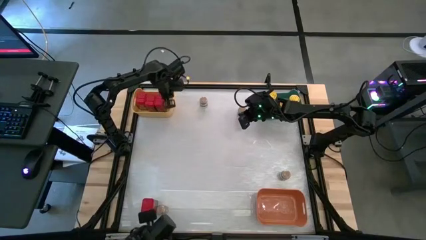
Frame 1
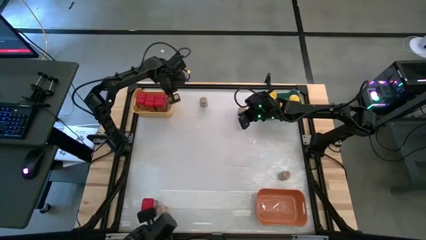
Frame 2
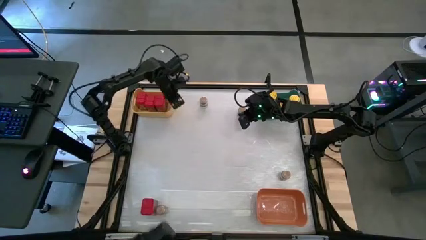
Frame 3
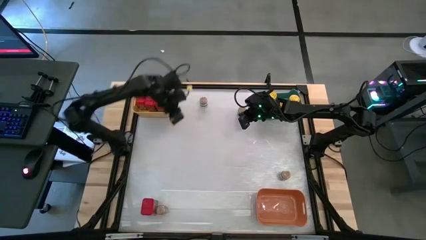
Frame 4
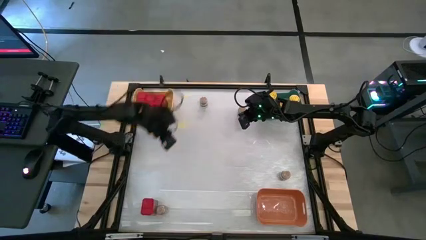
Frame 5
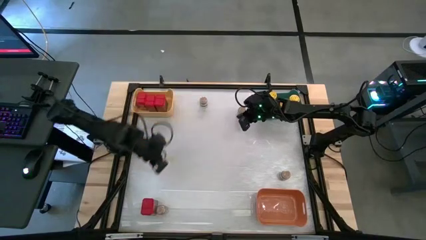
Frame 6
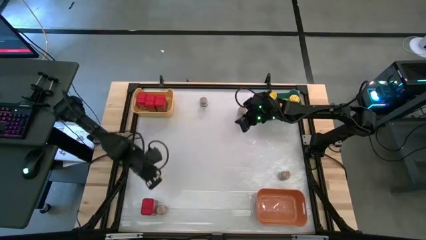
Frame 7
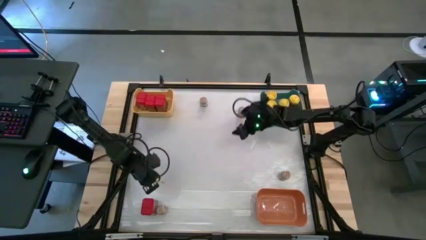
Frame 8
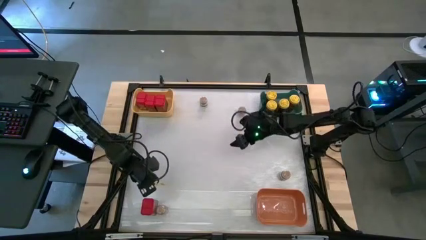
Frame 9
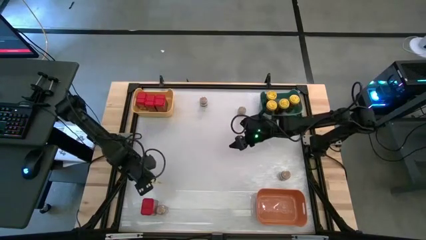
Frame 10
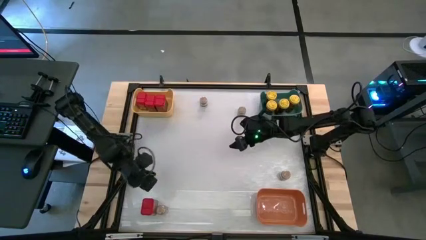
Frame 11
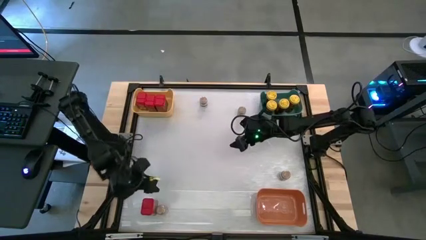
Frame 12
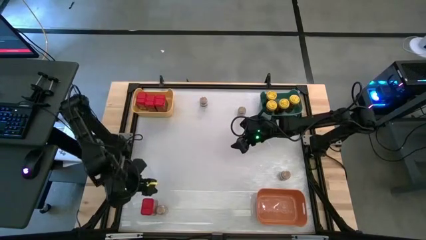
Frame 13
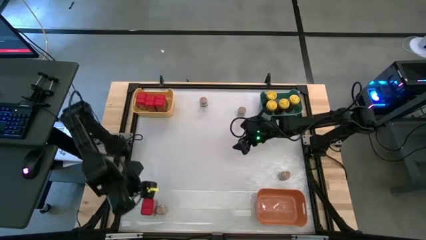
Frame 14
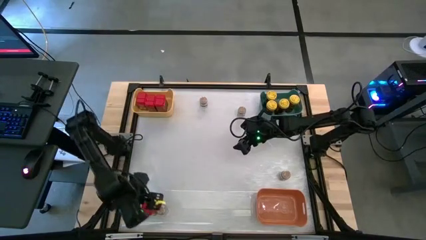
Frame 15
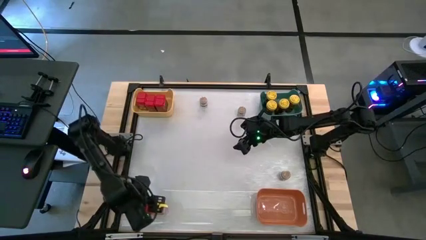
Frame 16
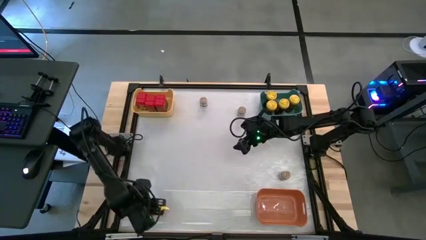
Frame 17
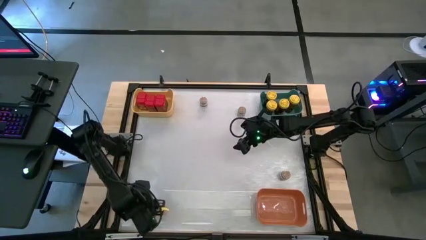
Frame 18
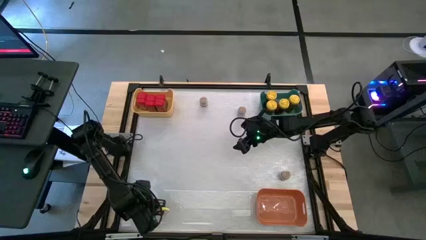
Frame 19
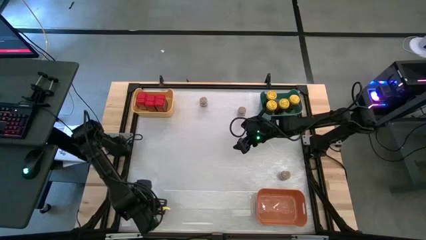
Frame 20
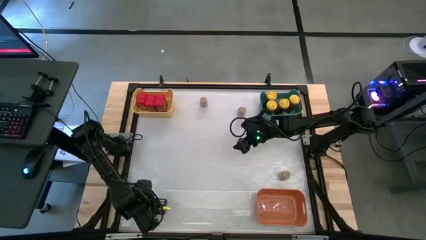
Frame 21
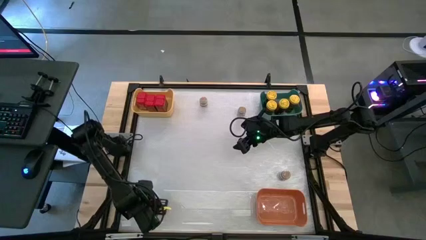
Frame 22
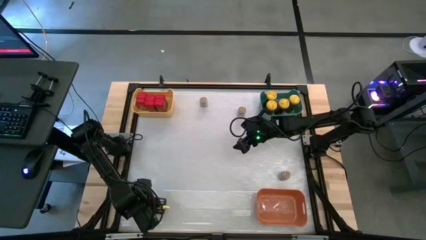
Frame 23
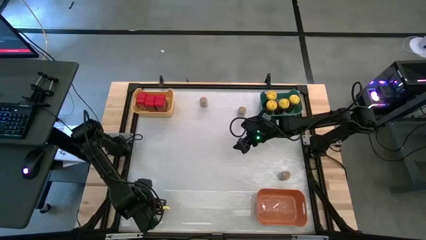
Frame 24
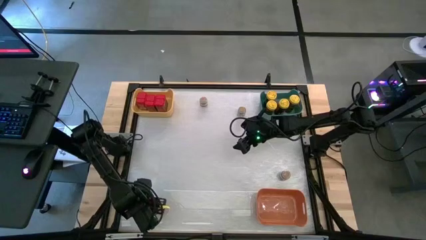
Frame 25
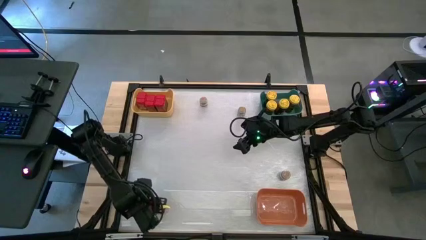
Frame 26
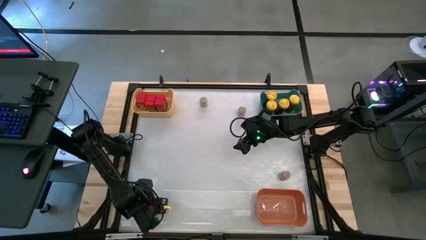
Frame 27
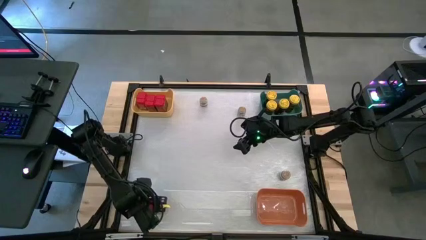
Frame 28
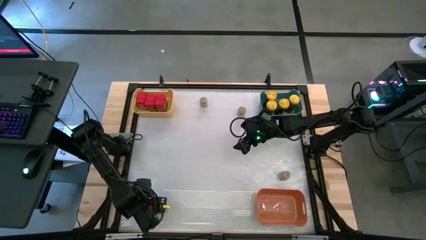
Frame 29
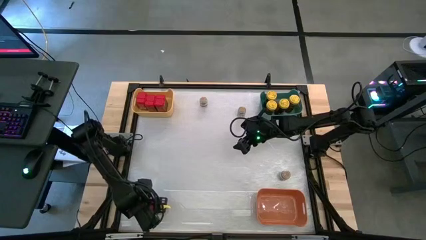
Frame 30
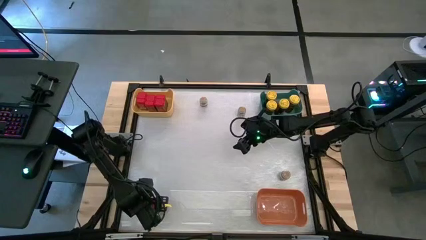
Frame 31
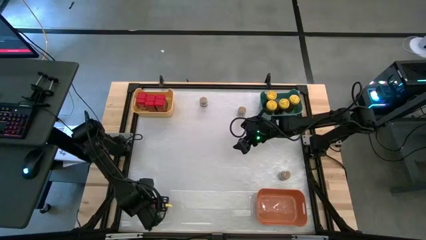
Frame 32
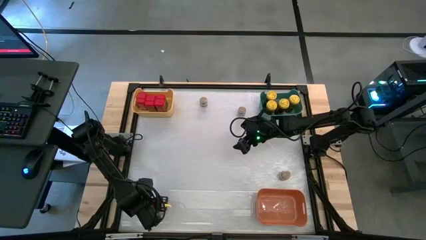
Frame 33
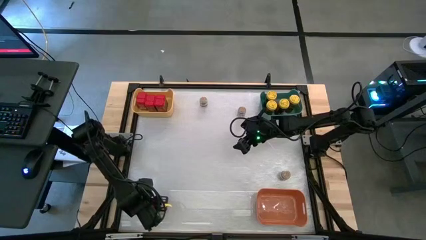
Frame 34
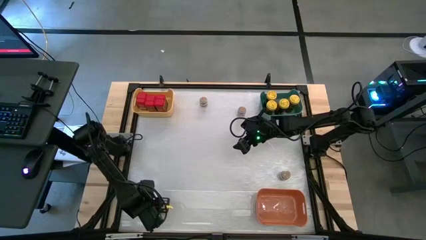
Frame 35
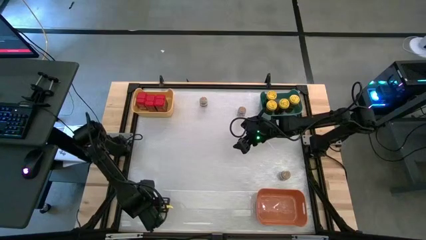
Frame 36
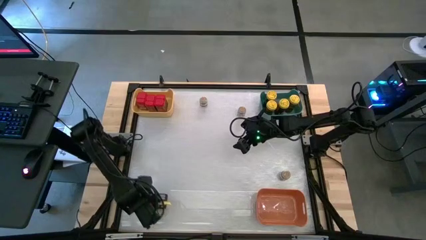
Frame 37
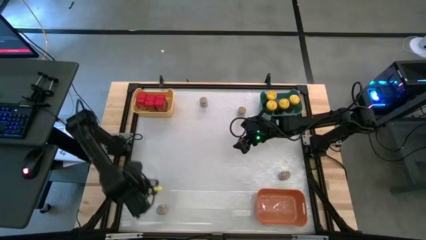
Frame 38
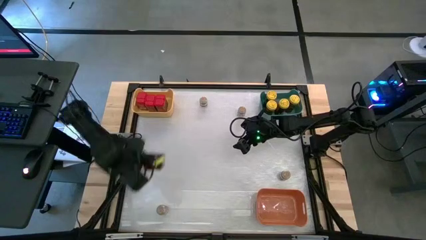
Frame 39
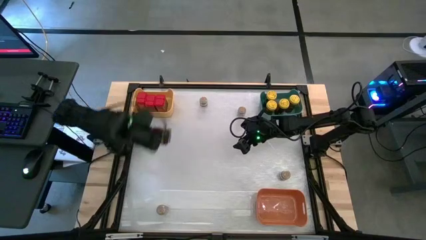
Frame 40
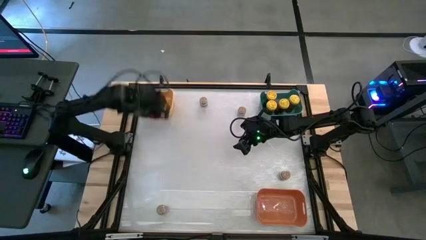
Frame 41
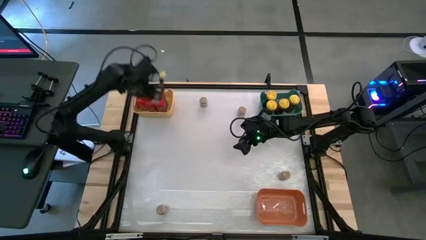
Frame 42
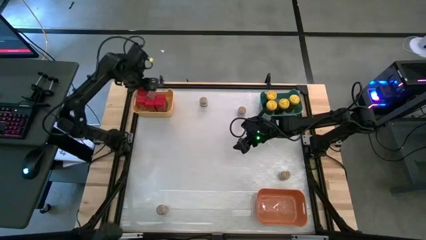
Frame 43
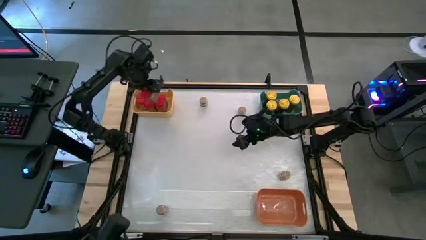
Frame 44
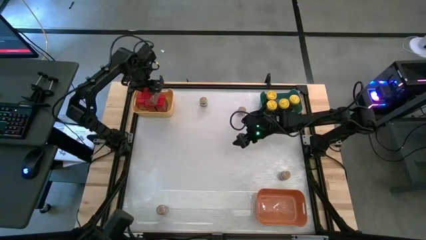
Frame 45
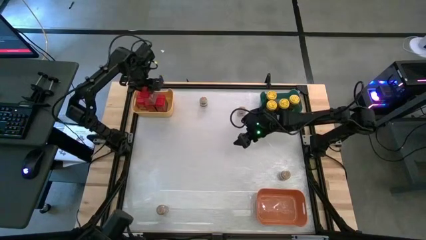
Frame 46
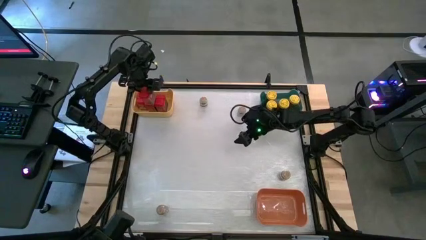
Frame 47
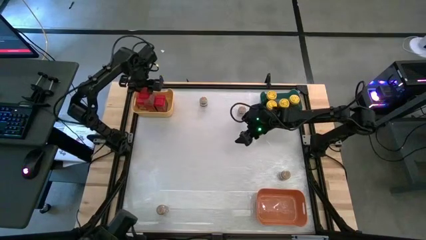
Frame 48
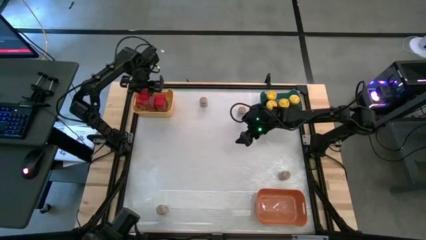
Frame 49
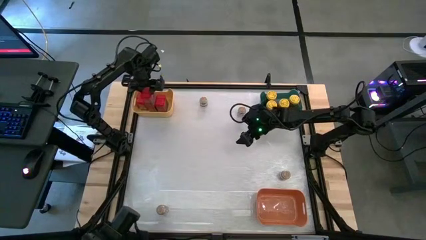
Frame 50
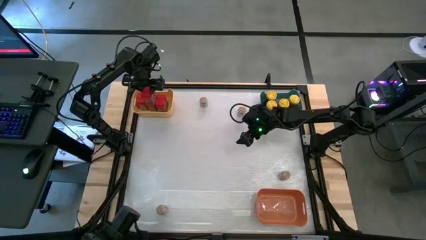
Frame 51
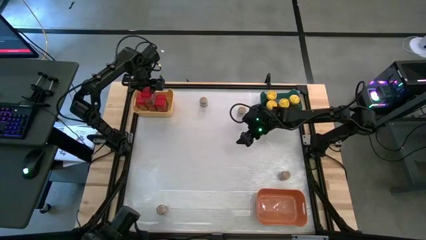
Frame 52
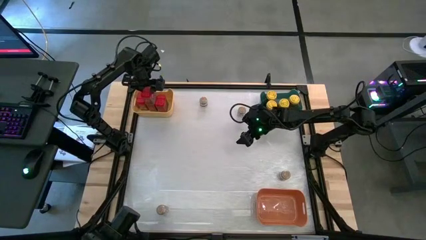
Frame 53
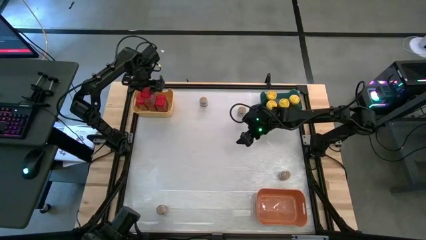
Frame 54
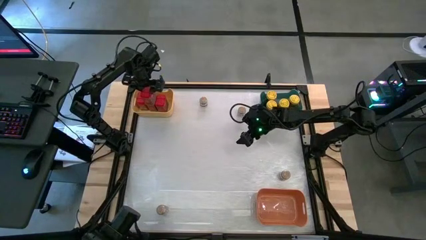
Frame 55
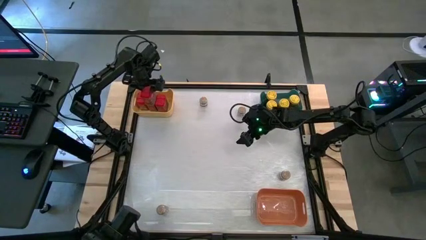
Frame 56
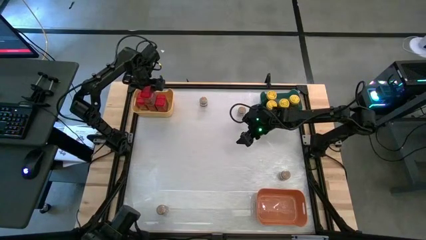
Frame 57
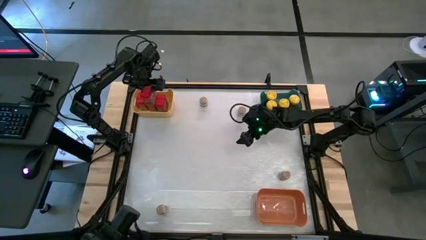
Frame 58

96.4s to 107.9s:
Task: Sort spices by type
Stack the red seasoning can on the red seasoning can in the yellow bin

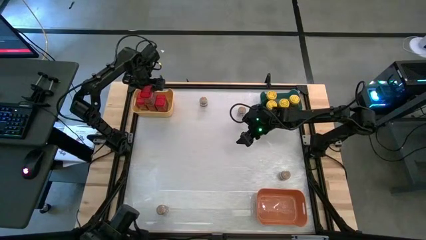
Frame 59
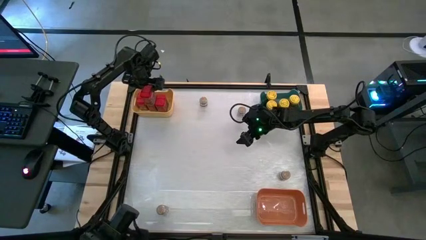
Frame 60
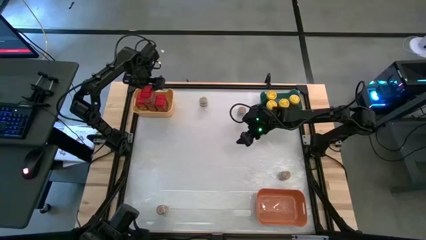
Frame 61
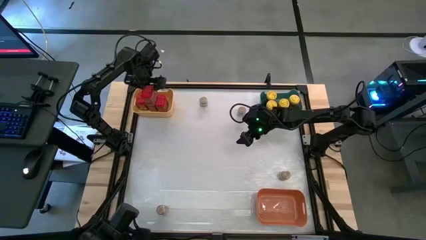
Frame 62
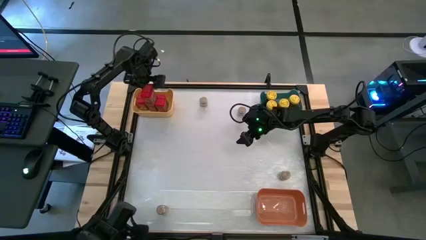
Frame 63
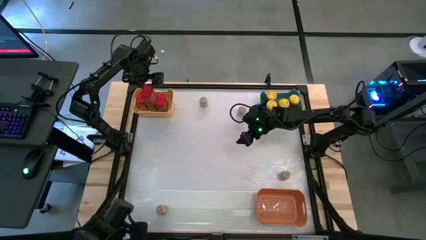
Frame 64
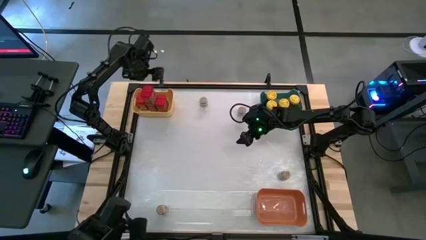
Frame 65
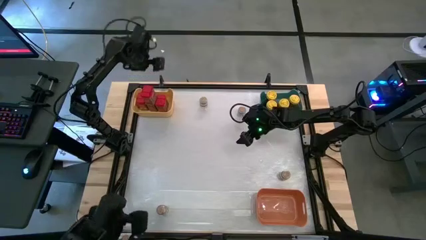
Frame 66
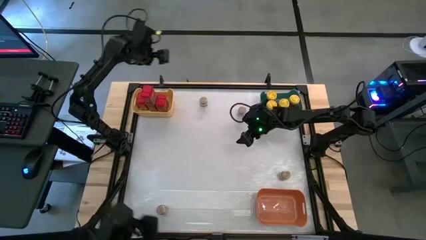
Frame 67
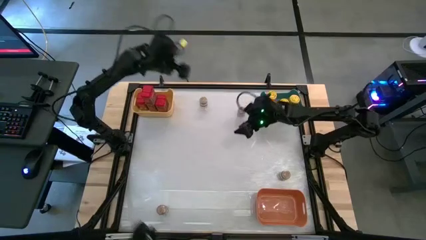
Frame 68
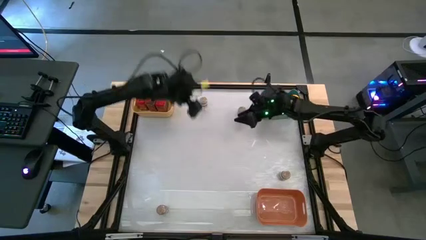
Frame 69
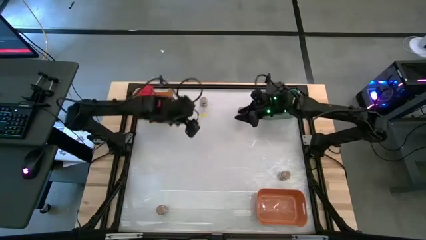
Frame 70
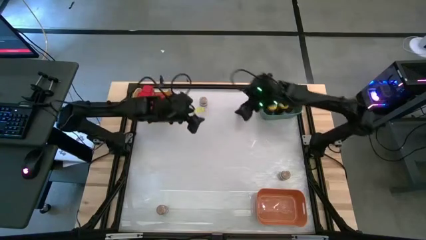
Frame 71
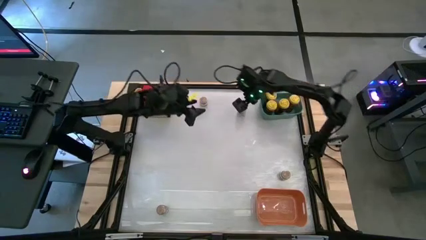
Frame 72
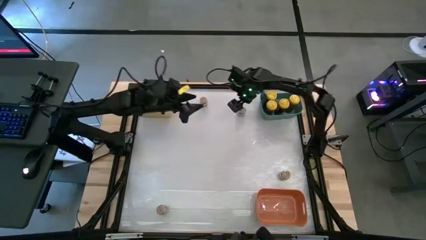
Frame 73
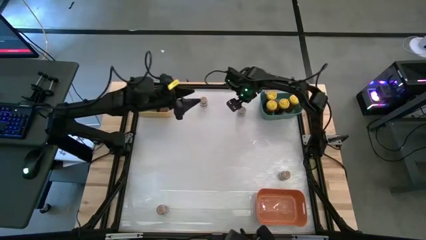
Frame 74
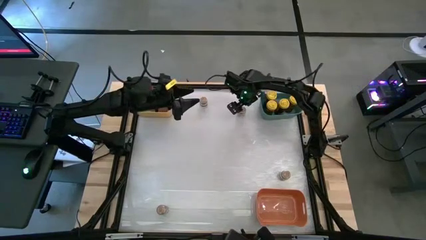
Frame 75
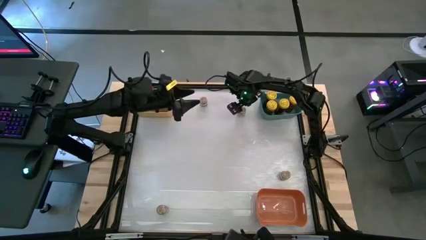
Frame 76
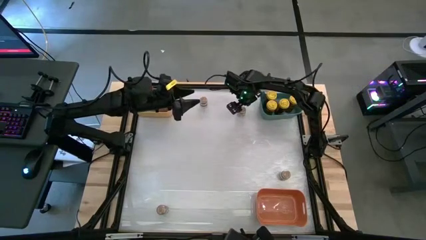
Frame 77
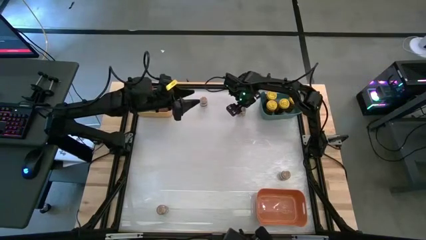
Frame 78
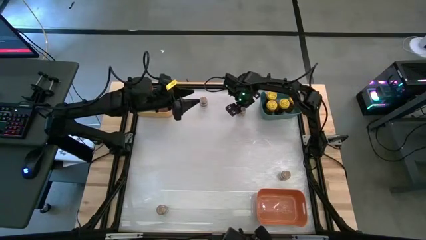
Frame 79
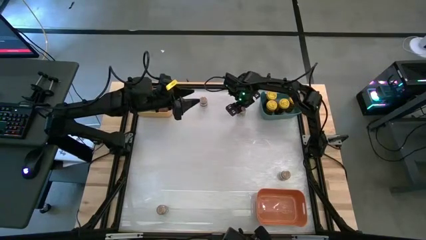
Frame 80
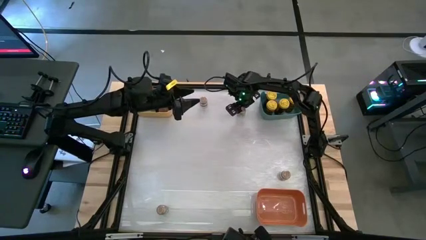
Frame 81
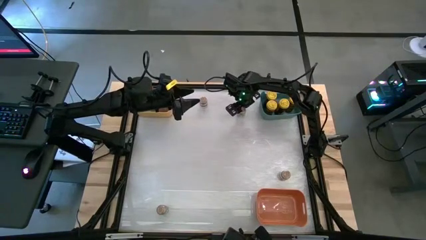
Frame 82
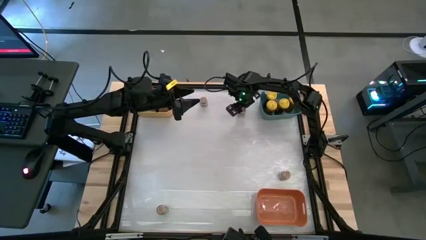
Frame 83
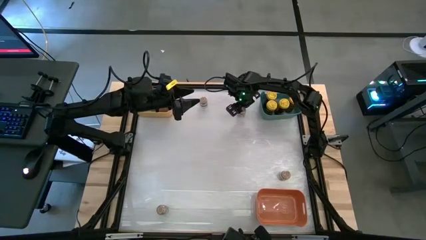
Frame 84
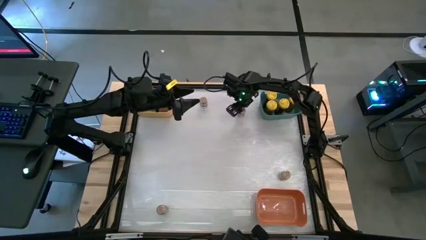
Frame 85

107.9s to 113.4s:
Put the top right brown seasoning bottle into the orange bin
